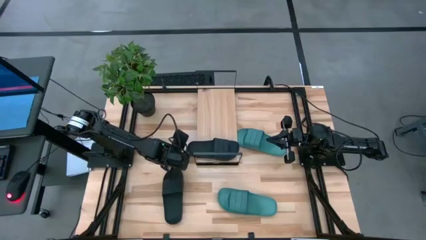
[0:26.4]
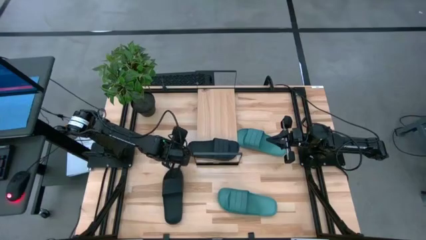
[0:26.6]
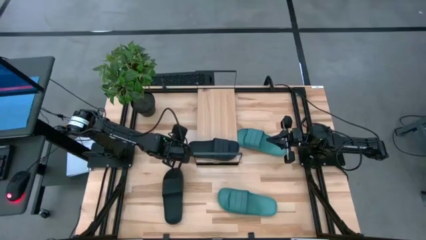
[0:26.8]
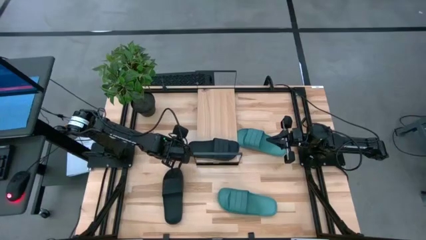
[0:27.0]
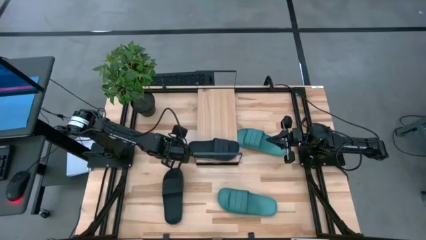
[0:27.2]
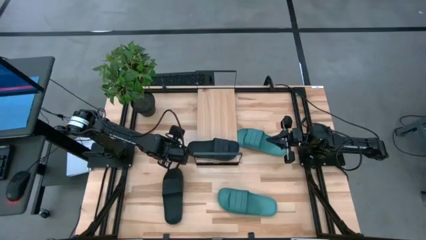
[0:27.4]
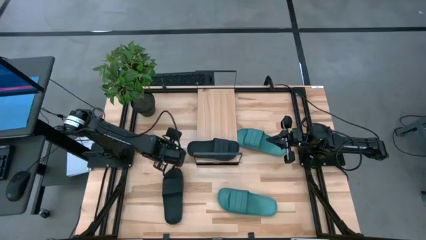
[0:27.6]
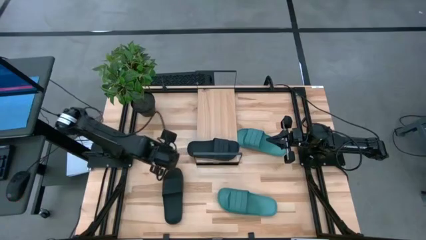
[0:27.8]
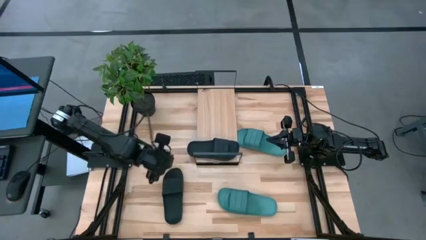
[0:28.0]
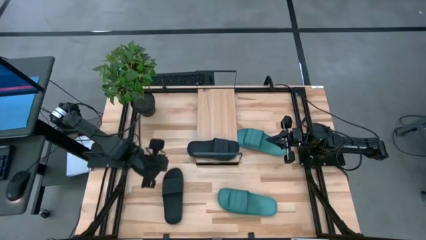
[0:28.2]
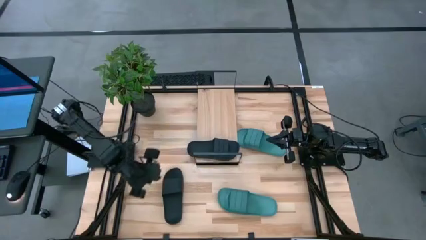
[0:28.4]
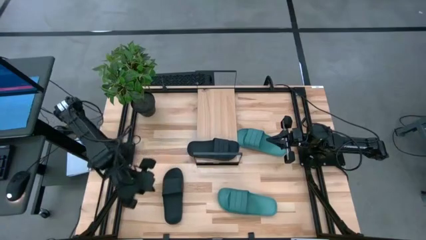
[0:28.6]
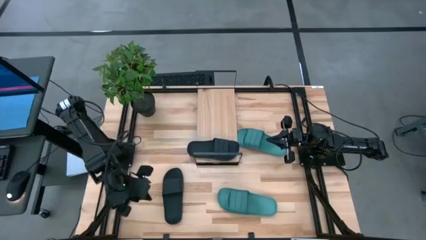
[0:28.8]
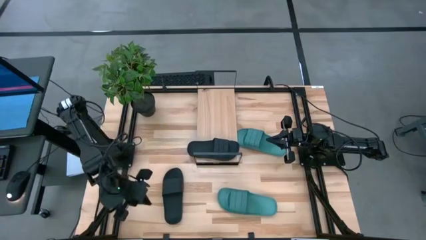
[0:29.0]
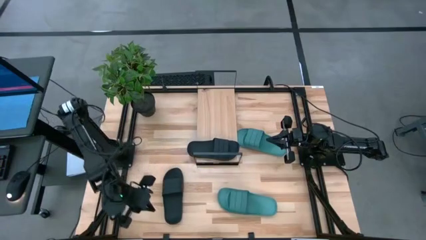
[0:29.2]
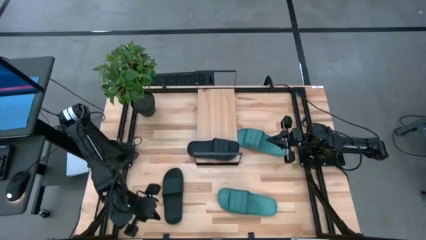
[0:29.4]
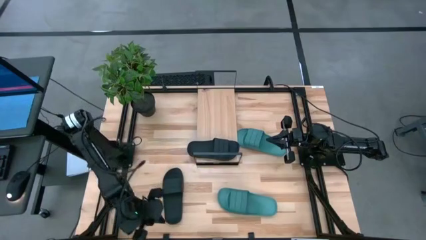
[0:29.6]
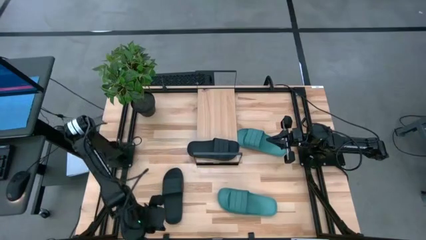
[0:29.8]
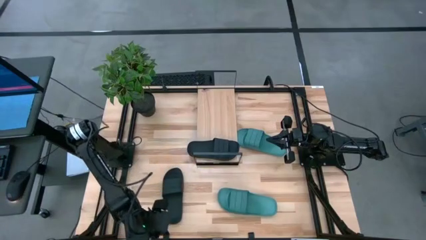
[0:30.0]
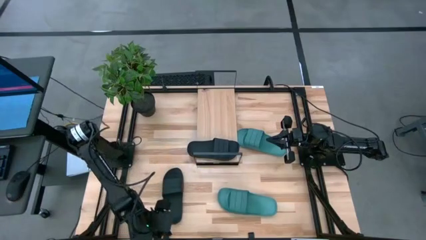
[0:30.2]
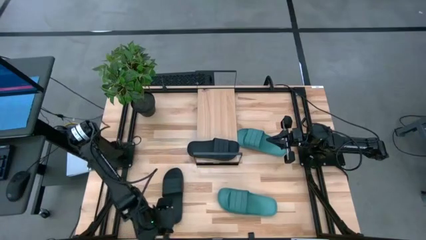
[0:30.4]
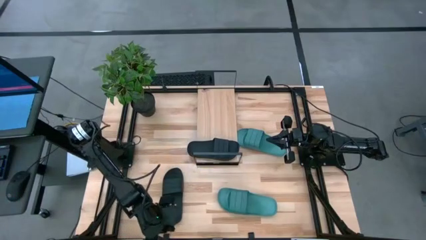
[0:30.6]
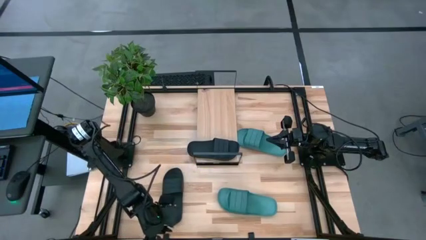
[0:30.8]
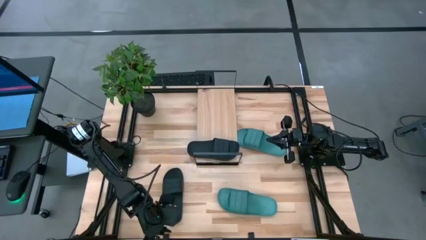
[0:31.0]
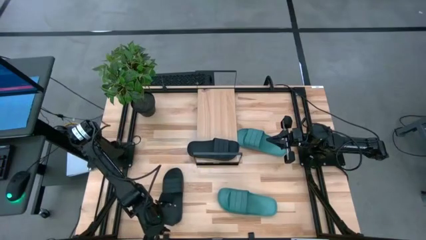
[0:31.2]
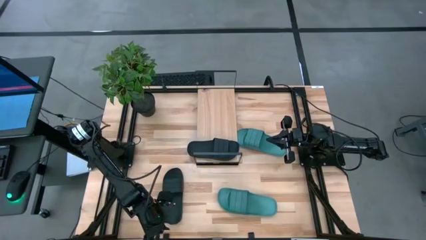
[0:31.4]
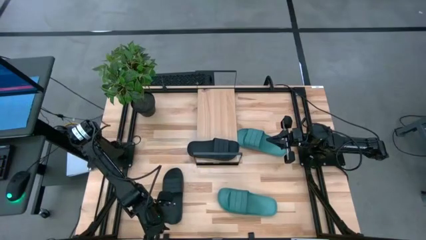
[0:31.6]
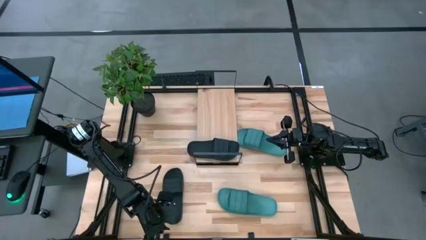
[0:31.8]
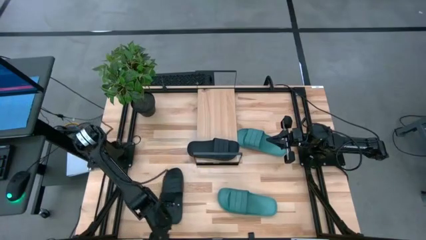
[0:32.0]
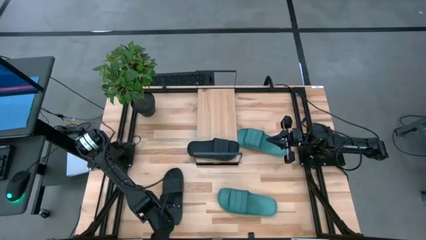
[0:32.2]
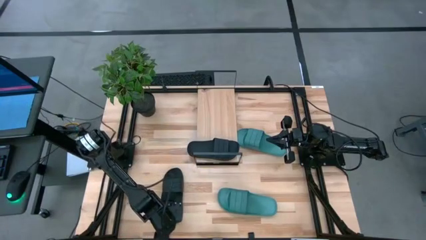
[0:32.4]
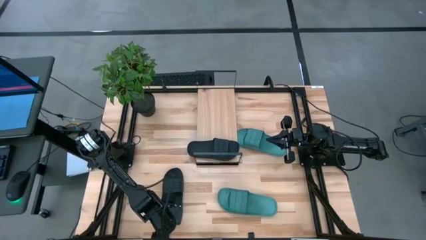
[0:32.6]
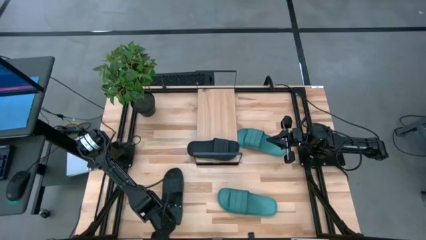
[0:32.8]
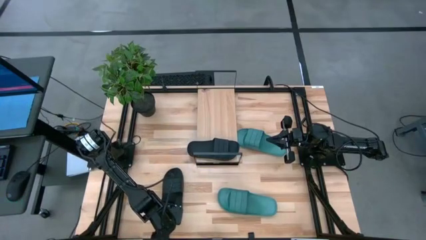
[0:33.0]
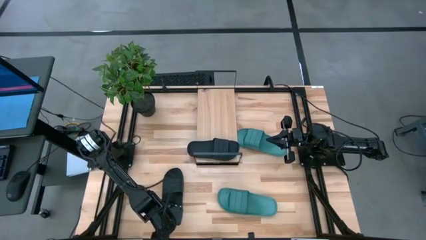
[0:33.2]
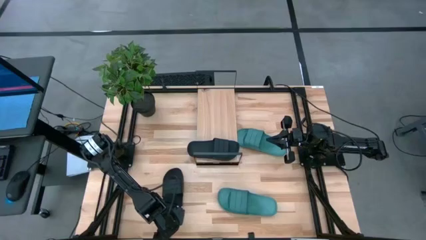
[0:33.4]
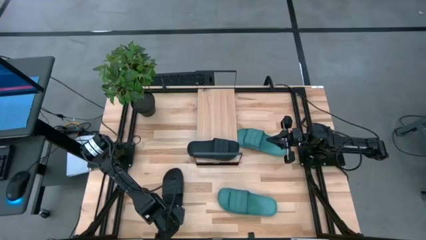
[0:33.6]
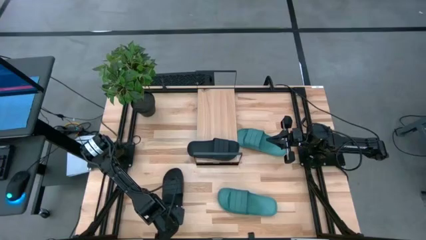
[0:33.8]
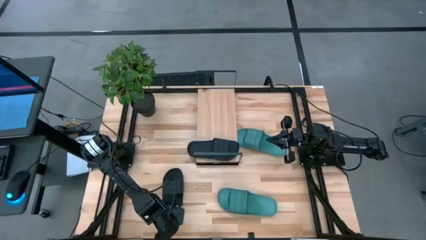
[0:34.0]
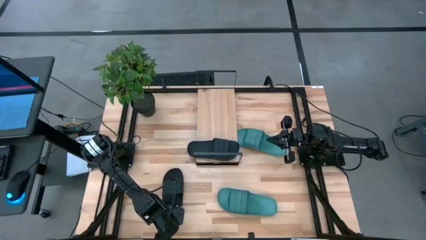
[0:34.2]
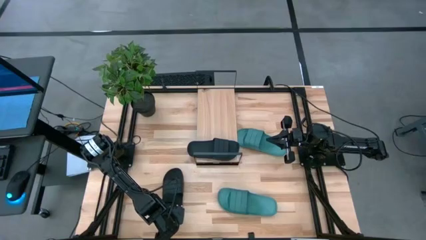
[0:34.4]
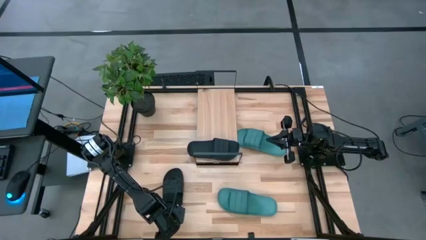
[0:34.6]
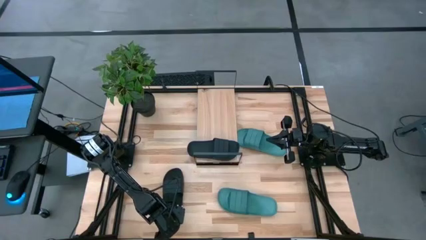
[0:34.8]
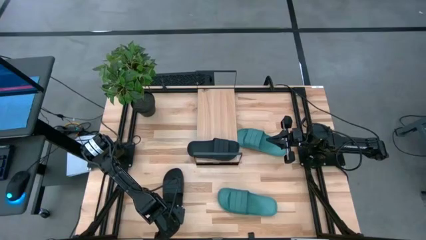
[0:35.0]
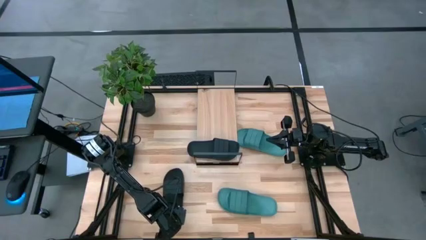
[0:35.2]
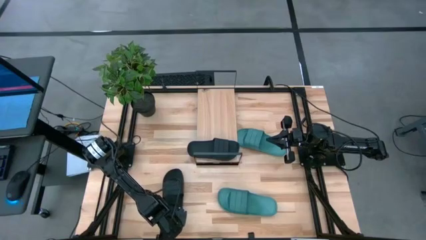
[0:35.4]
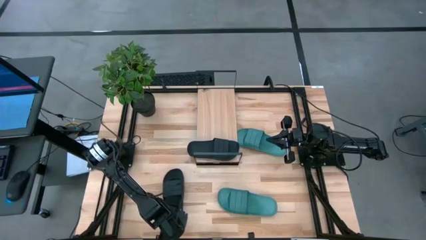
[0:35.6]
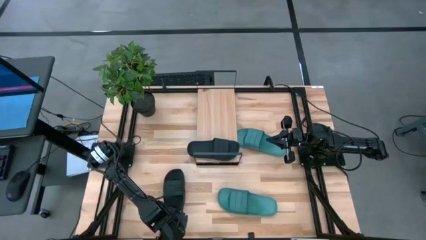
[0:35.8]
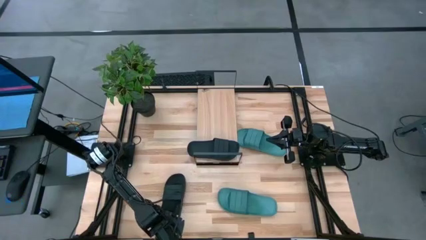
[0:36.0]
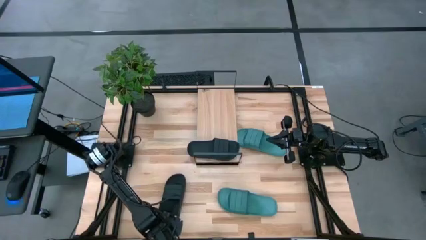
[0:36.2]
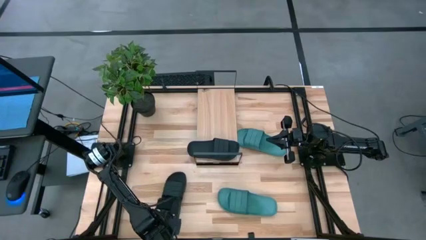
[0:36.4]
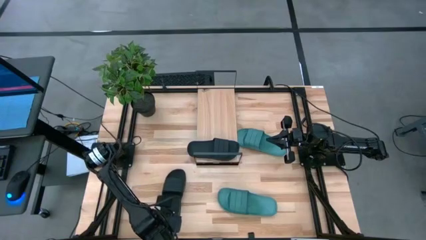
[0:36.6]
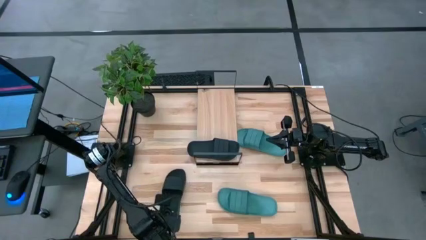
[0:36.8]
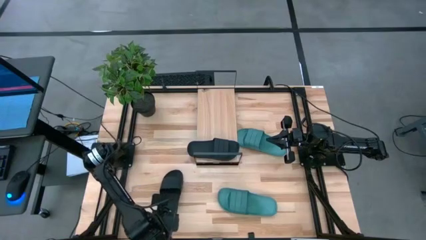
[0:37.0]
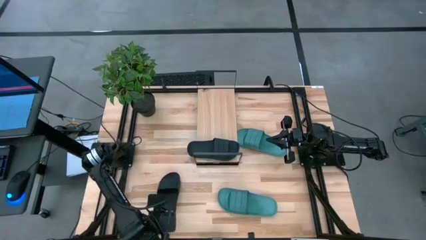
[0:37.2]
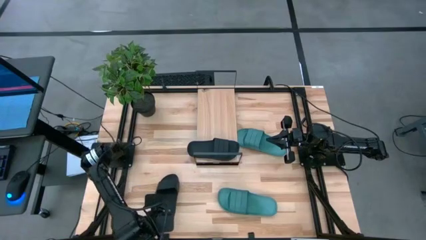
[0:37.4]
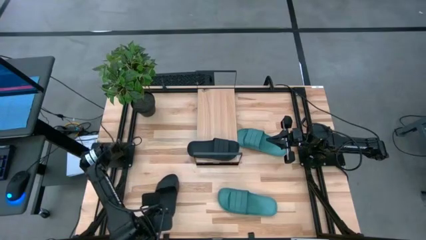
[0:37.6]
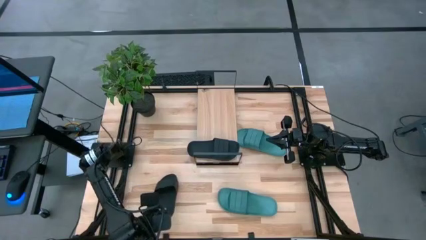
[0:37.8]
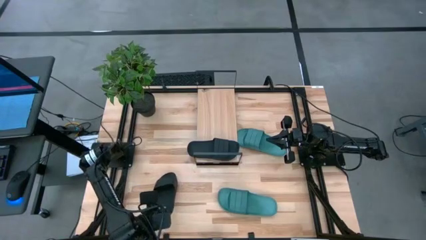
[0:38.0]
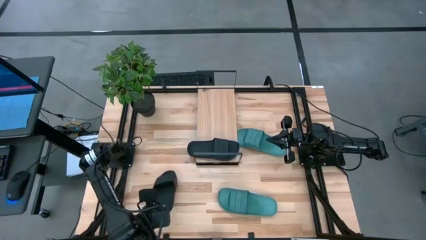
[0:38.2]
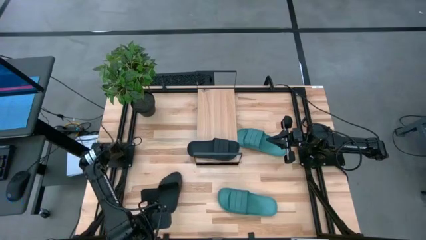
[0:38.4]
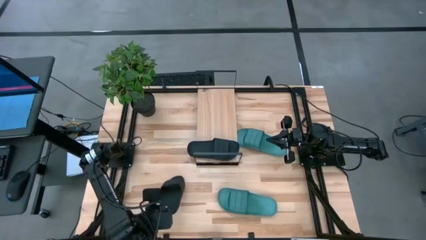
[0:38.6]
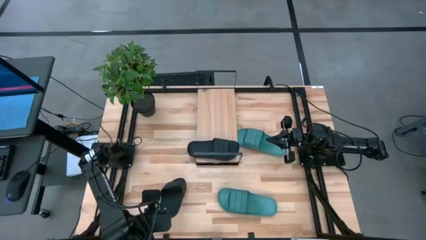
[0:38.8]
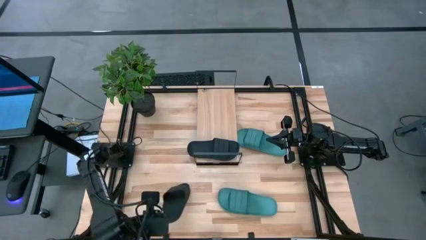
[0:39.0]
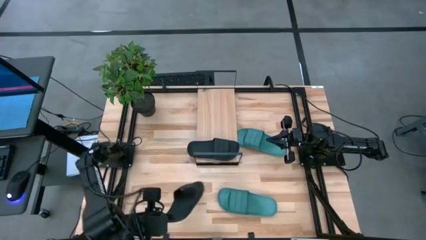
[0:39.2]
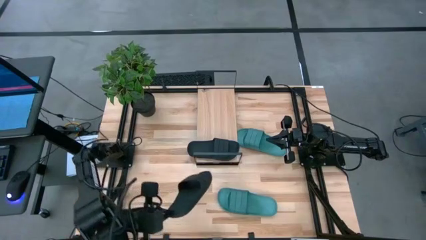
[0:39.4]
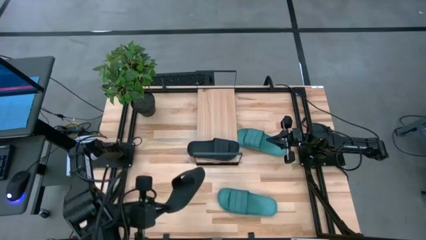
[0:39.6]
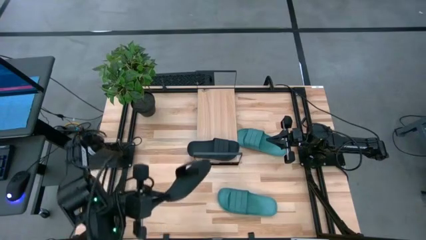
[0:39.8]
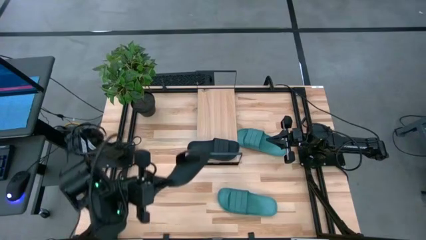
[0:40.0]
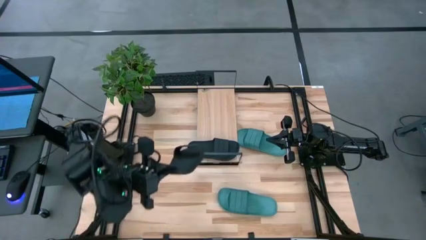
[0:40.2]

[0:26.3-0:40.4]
Task: Pick and place slides into the shelf
Put the black slide on the shelf

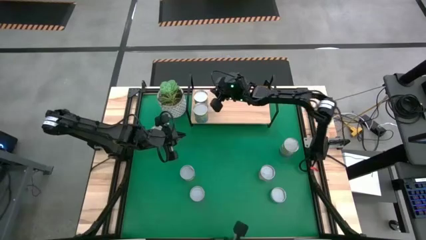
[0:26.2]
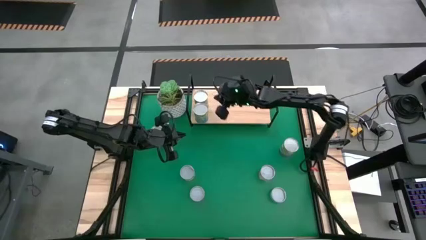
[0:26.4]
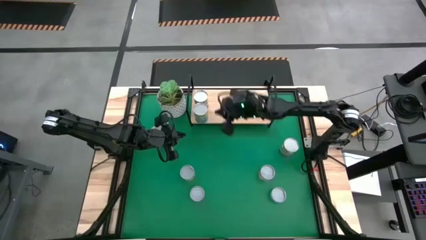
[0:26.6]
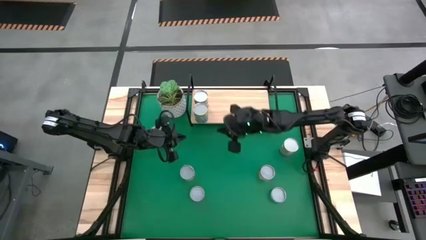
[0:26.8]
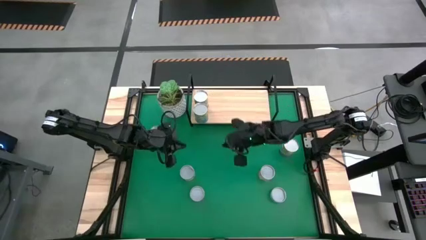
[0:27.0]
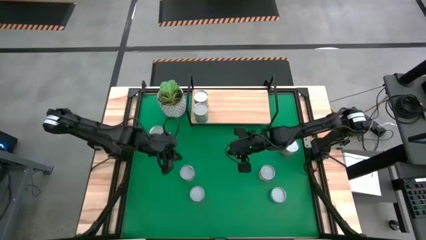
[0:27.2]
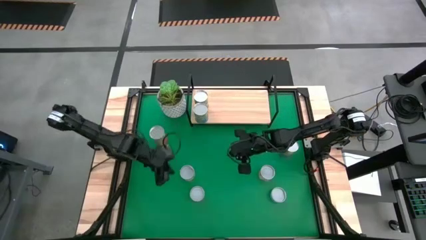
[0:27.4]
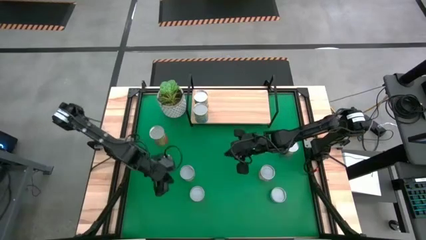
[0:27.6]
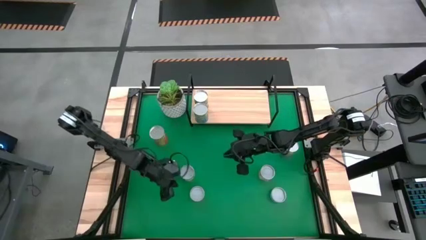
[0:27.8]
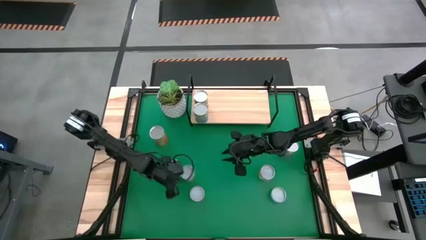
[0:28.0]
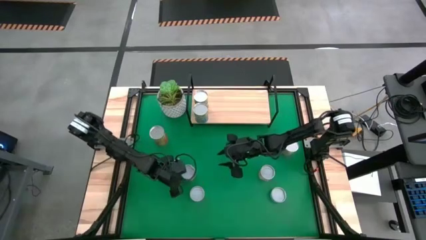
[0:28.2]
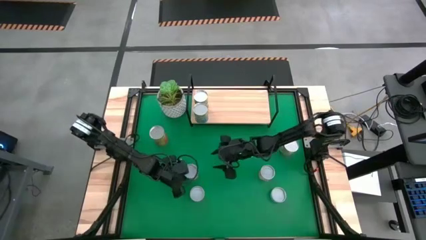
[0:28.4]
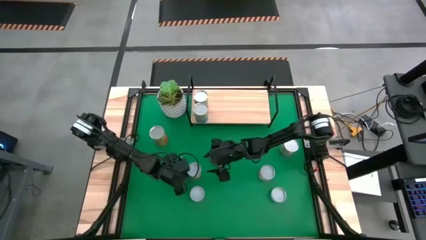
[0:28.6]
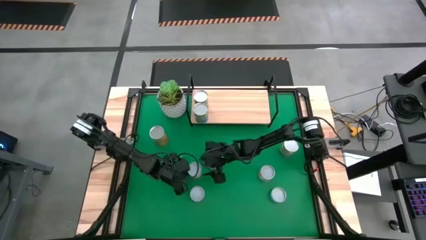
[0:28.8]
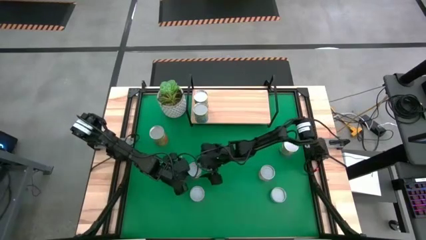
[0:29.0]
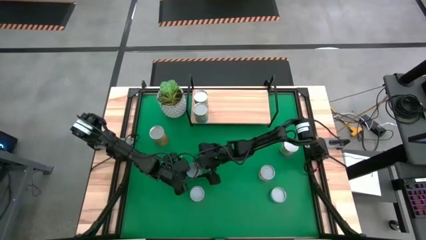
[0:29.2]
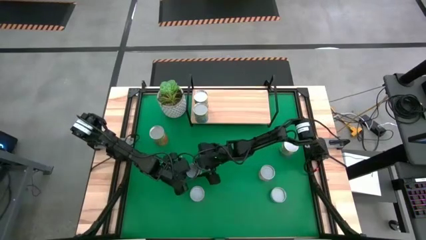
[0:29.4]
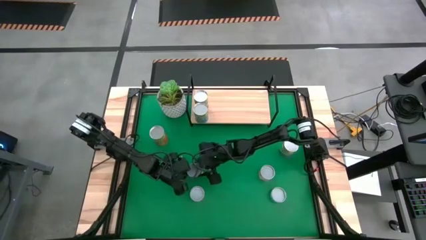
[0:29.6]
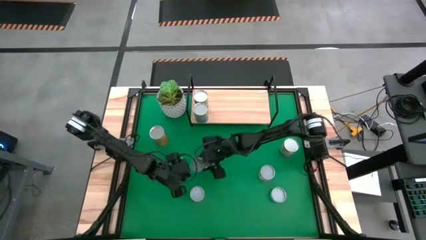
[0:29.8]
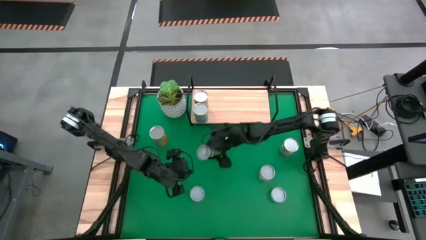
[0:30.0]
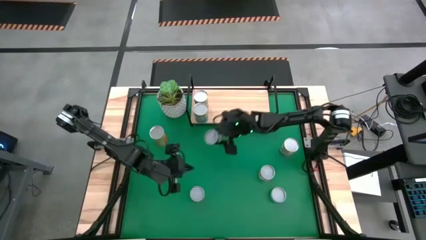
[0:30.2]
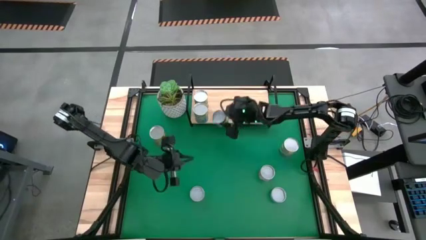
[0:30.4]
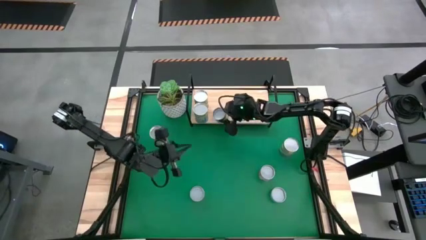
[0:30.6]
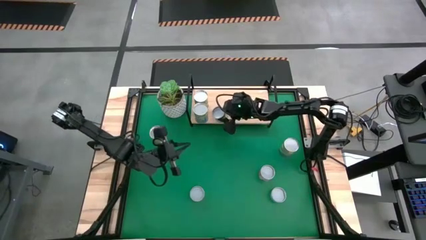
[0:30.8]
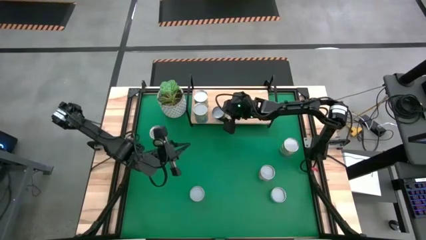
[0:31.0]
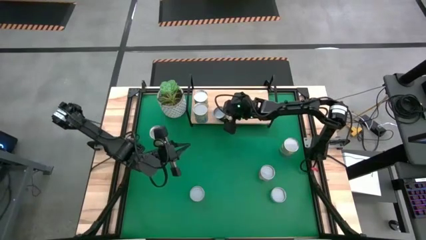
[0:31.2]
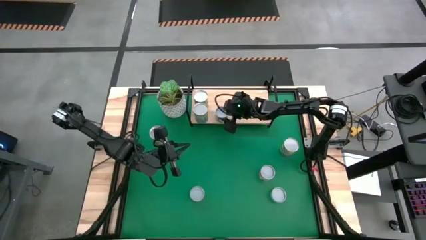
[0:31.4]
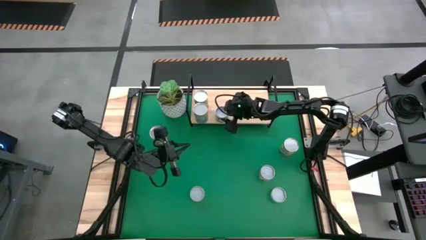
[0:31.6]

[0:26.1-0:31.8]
Task: Pick and place cans onto a shelf
Put the canned peaches on the shelf
